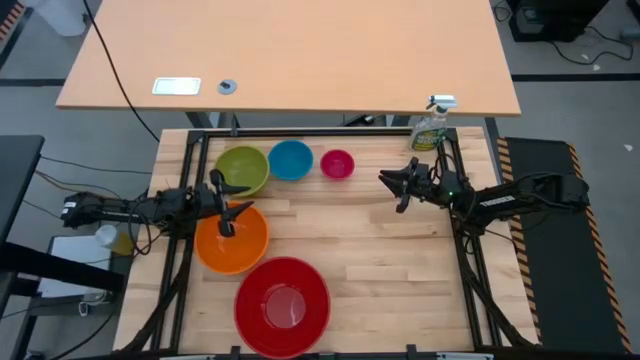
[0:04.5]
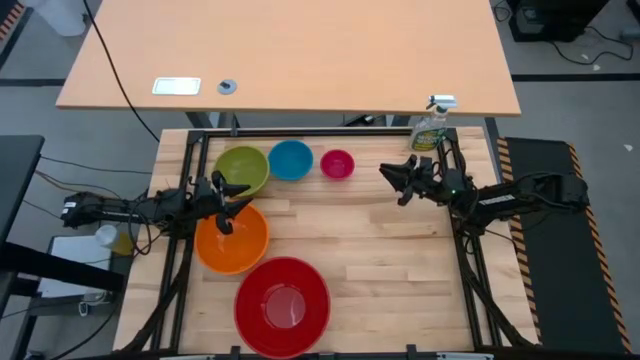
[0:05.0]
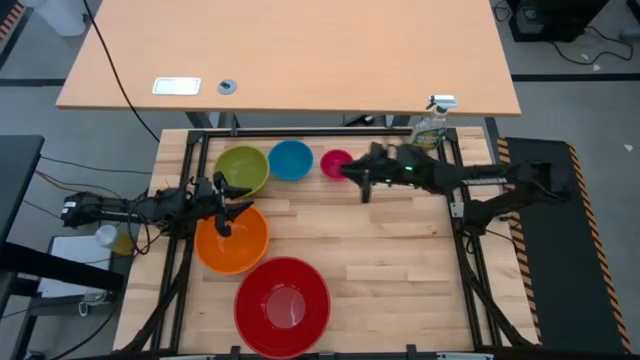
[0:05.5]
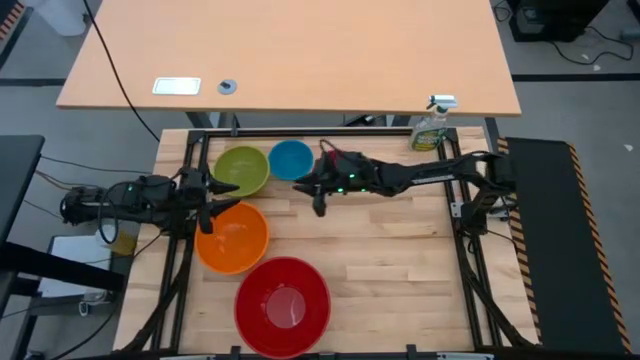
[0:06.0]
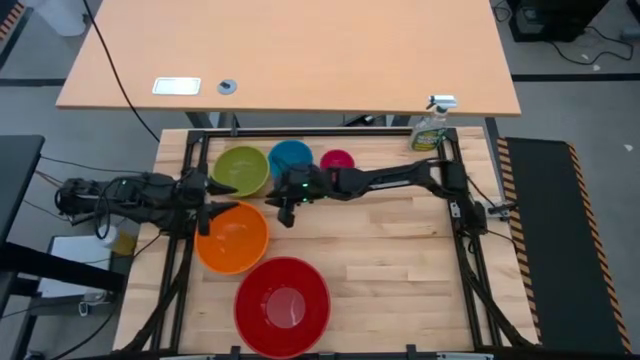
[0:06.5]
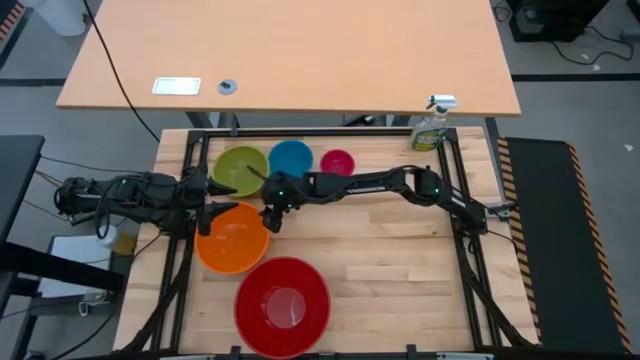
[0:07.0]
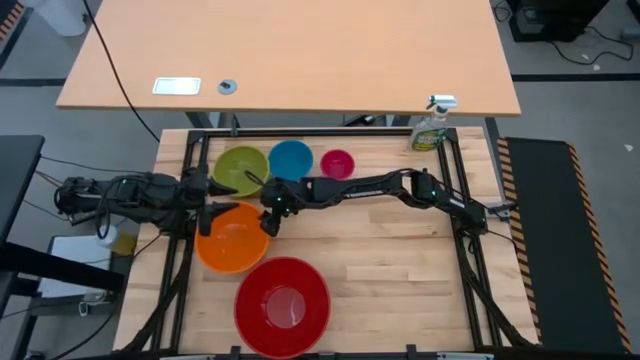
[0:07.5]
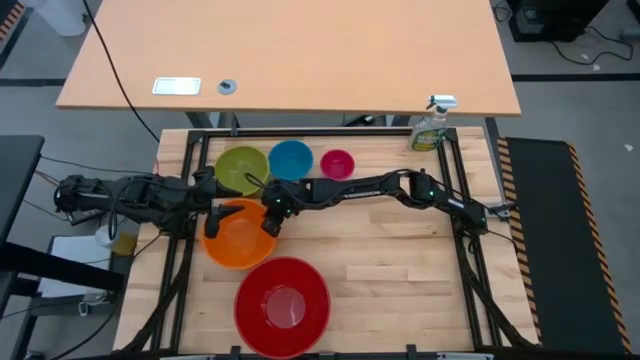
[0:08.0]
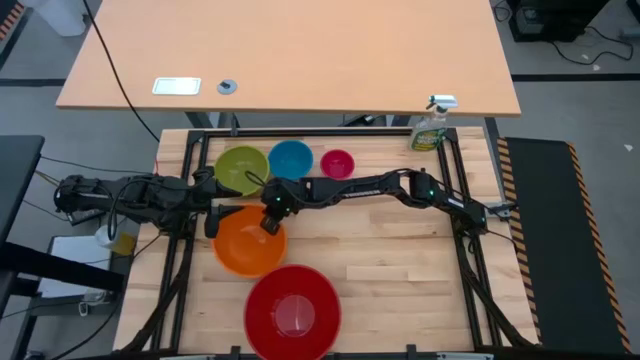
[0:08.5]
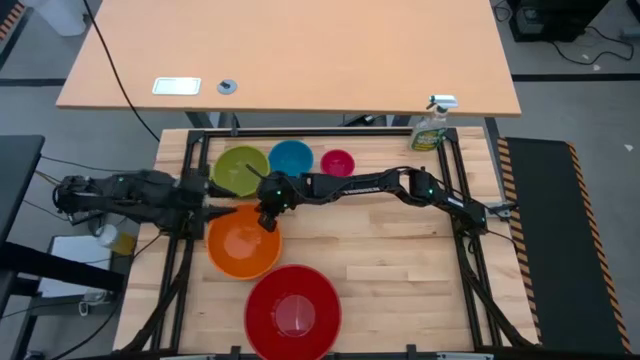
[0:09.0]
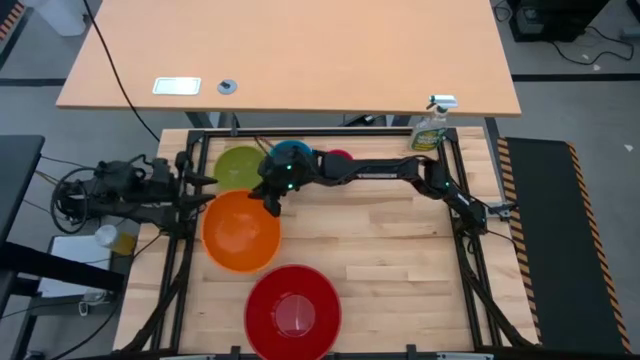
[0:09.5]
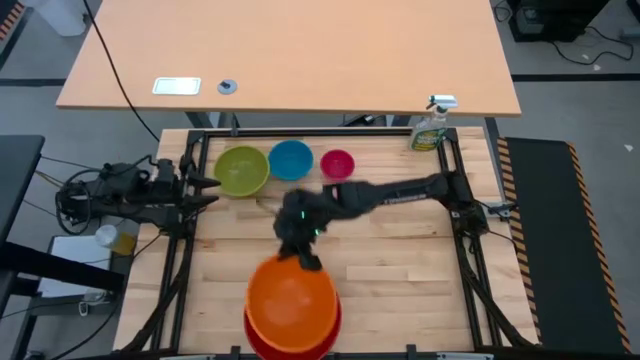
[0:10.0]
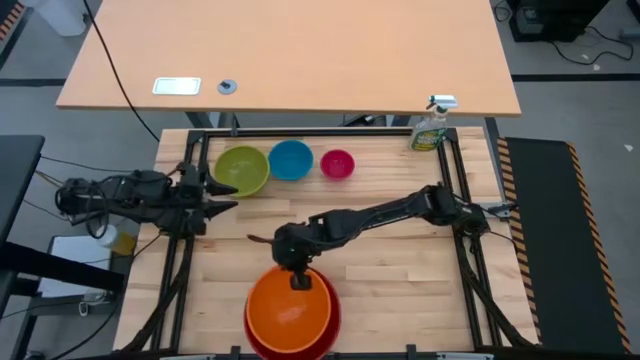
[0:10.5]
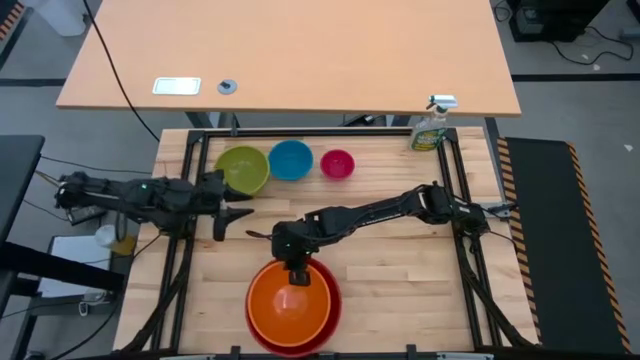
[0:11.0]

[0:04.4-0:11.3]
Stack the orange bowl on top of the red bowl

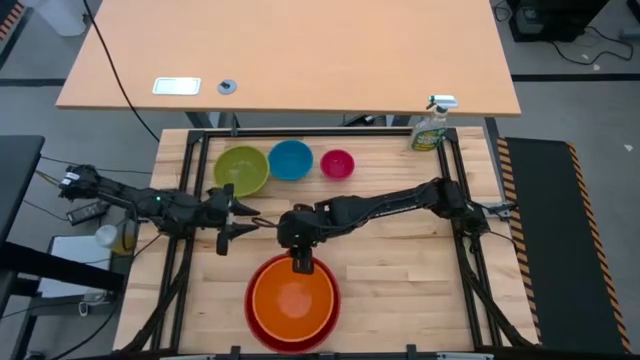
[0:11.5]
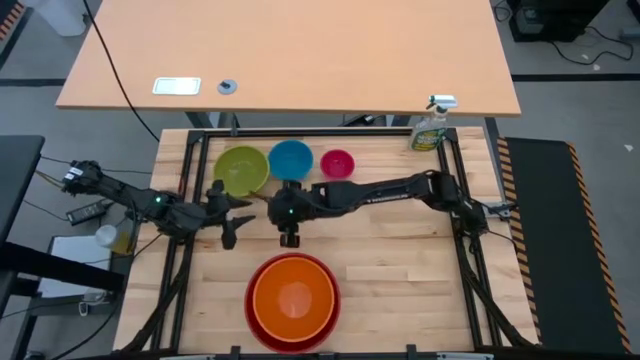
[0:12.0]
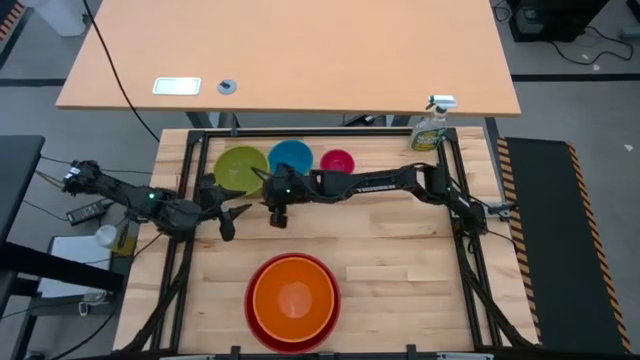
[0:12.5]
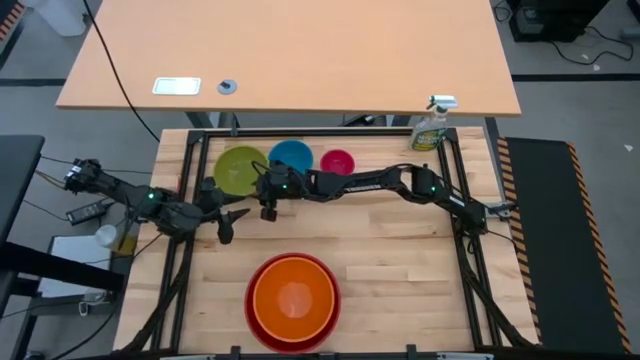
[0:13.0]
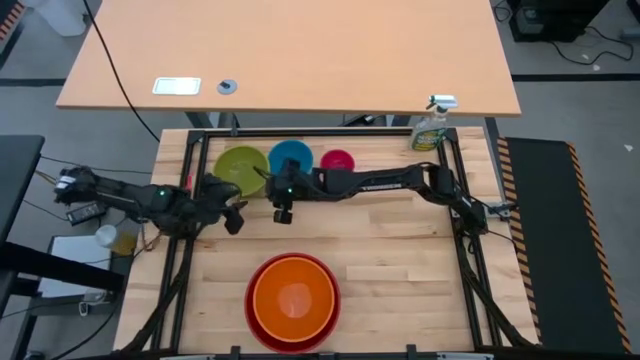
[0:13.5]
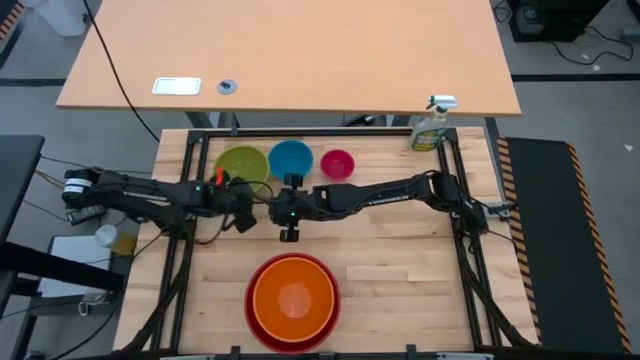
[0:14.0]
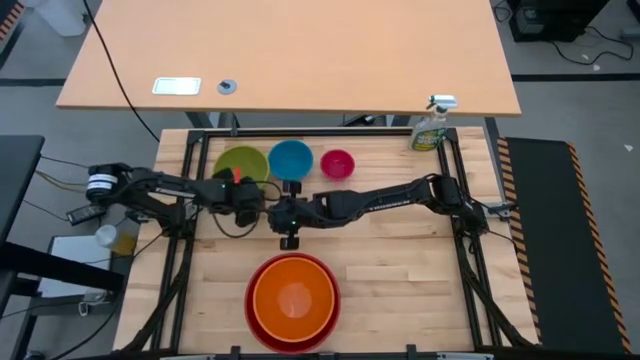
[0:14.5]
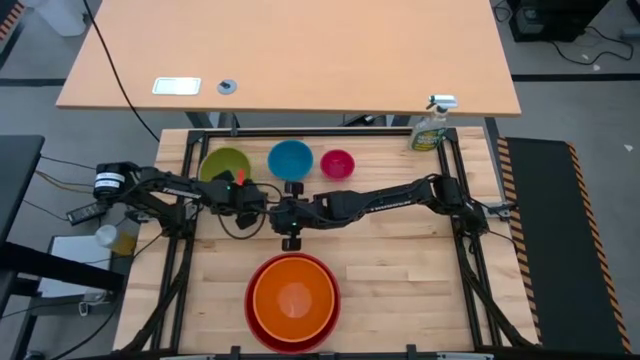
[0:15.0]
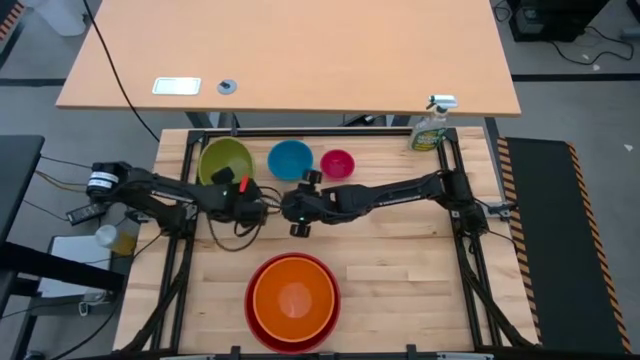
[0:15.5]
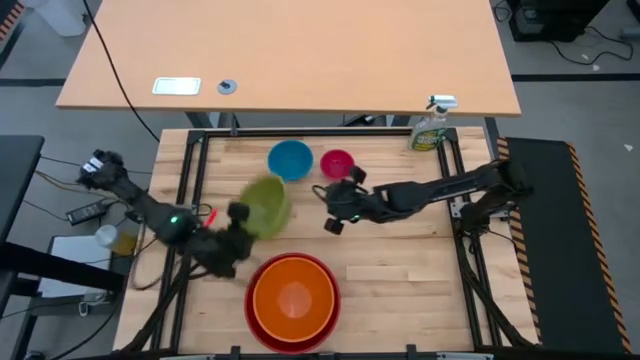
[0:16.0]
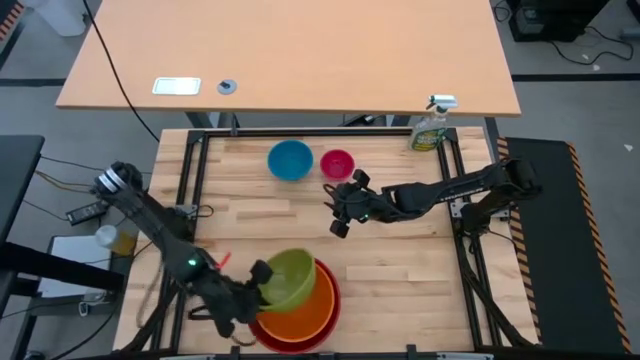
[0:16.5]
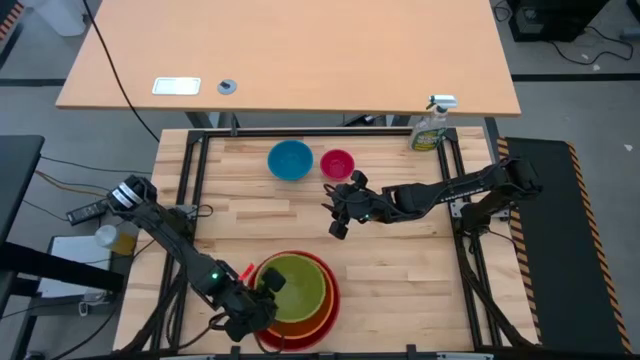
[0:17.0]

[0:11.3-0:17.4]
Stack the green on top of the orange bowl

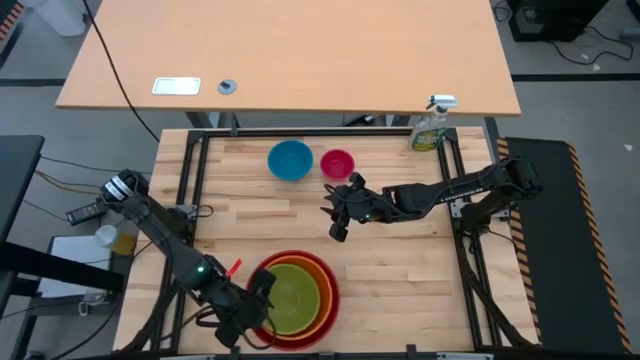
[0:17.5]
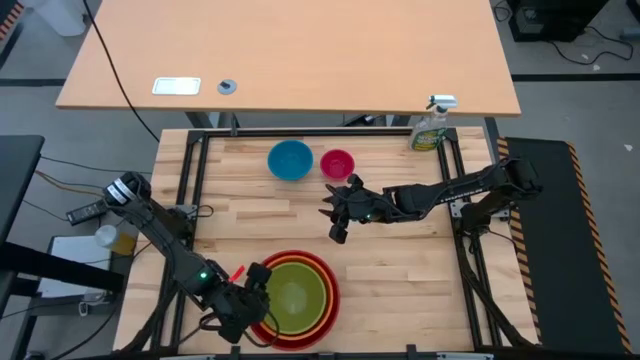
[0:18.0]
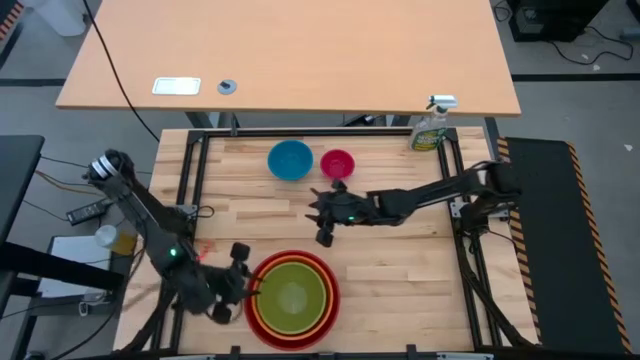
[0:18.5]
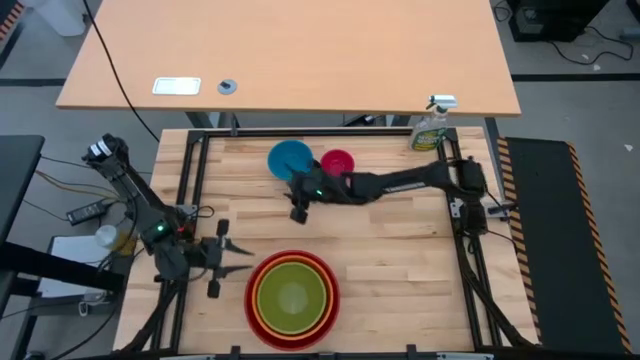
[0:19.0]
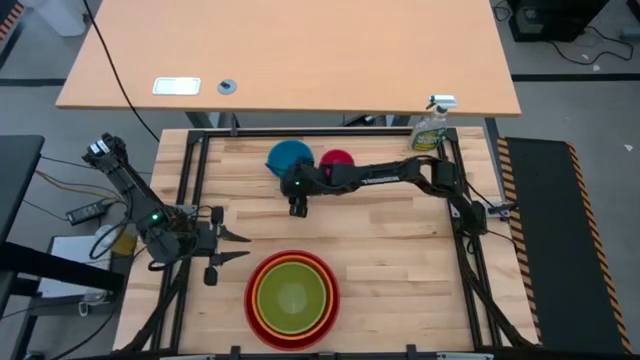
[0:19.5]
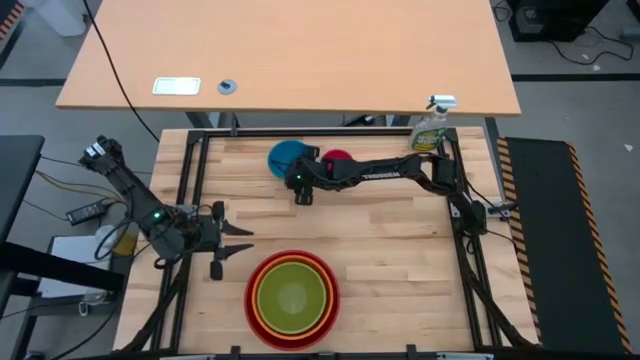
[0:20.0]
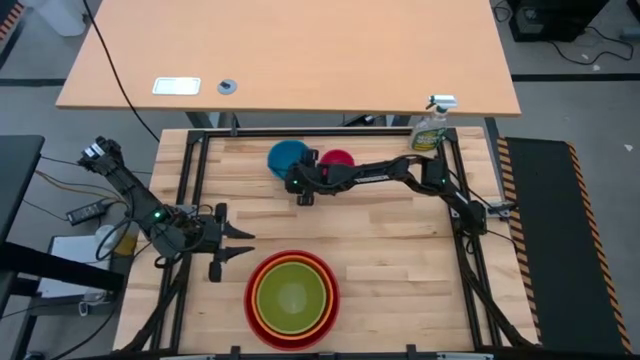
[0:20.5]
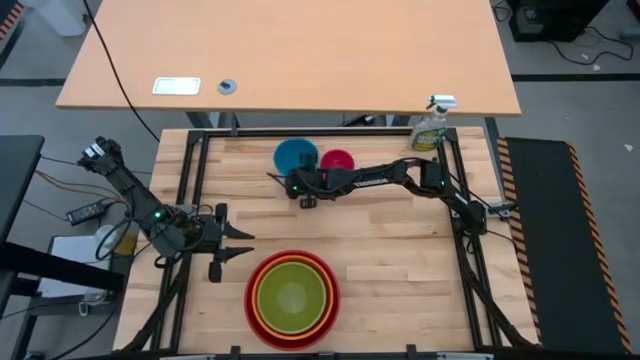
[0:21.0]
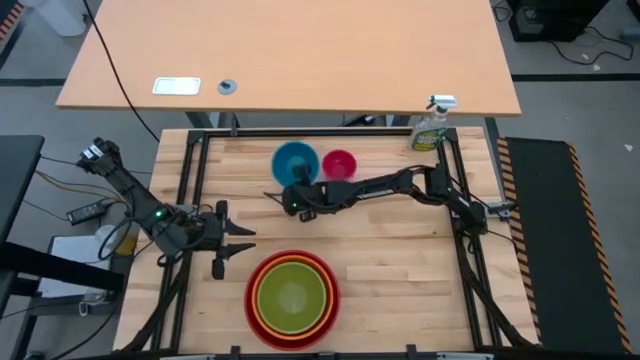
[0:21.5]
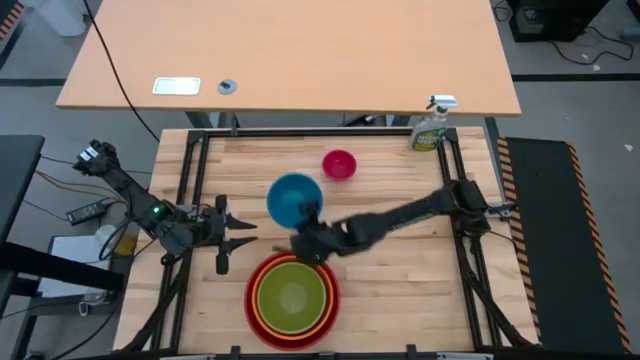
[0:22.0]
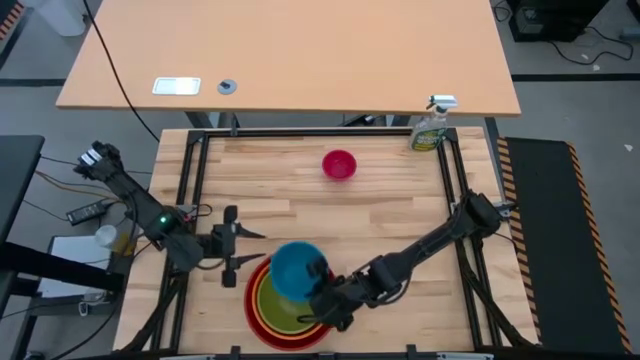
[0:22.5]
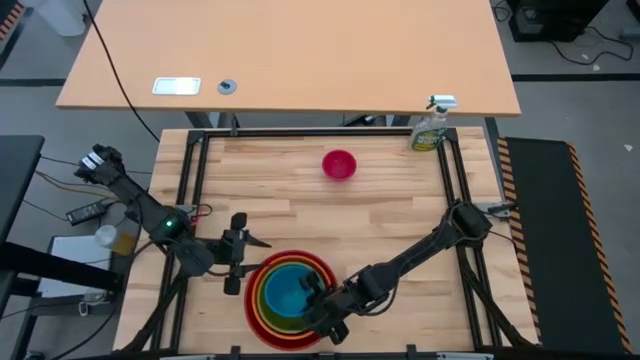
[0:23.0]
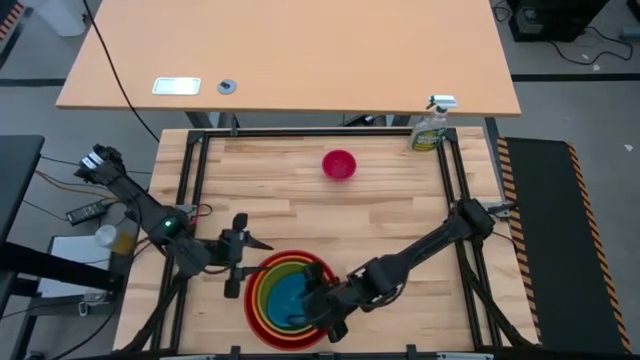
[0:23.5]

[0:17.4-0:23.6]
Stack the blue bowl on top of the green bowl

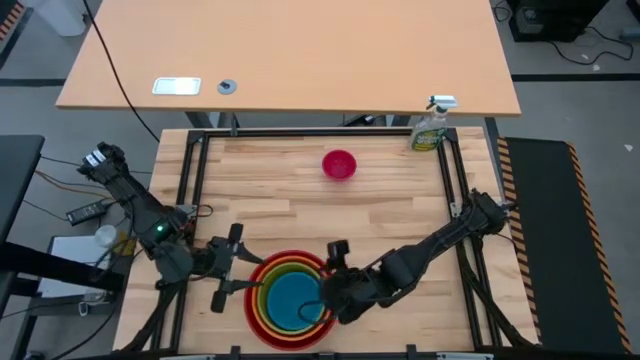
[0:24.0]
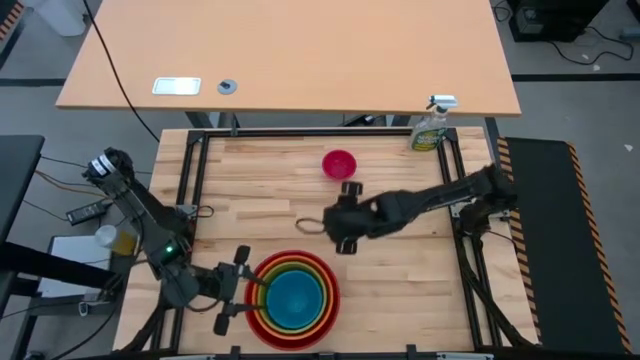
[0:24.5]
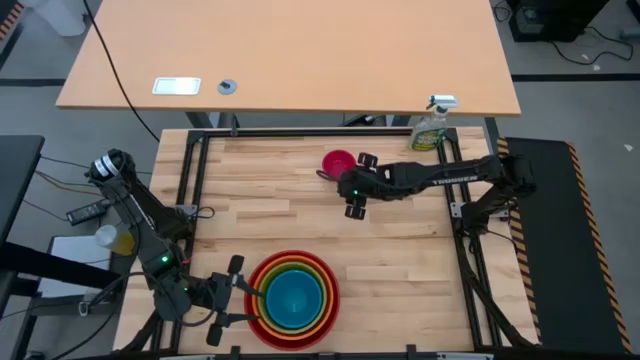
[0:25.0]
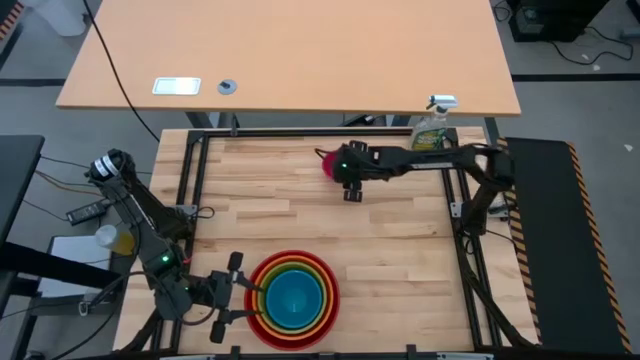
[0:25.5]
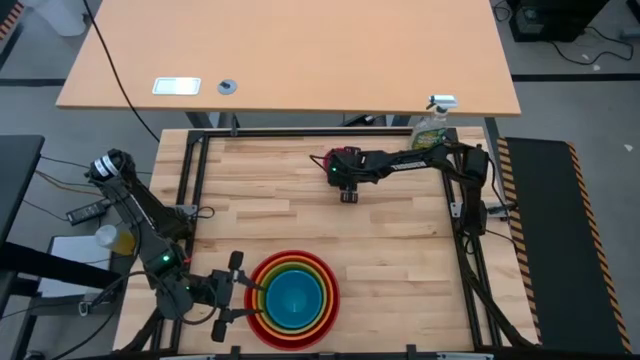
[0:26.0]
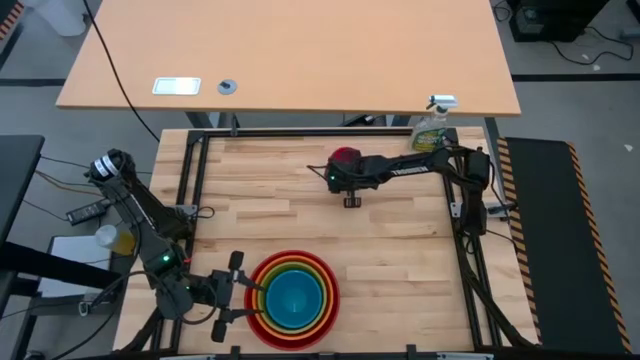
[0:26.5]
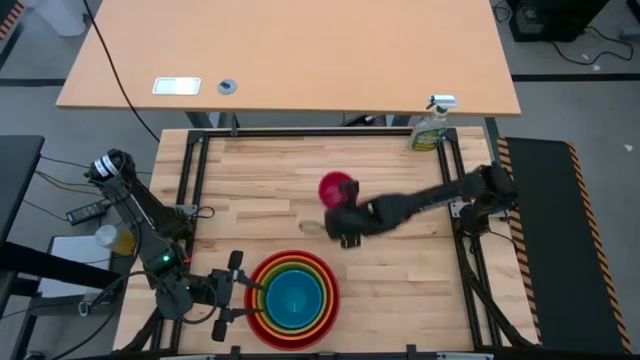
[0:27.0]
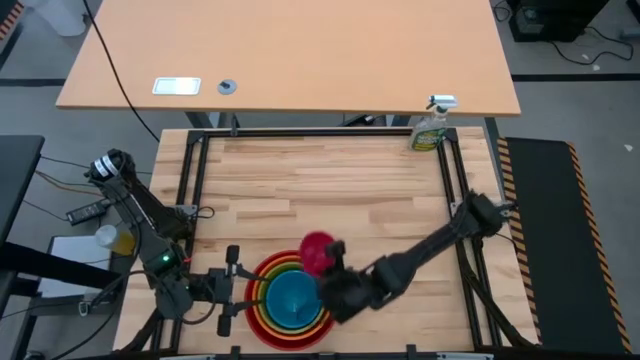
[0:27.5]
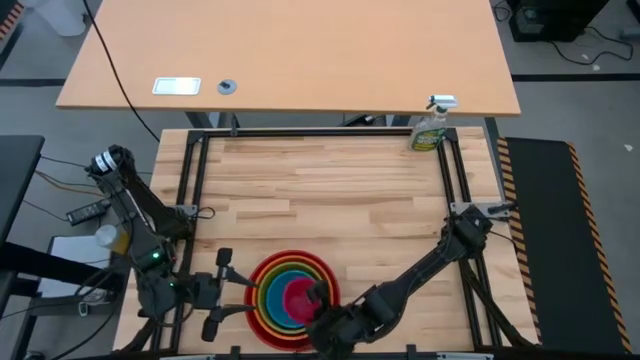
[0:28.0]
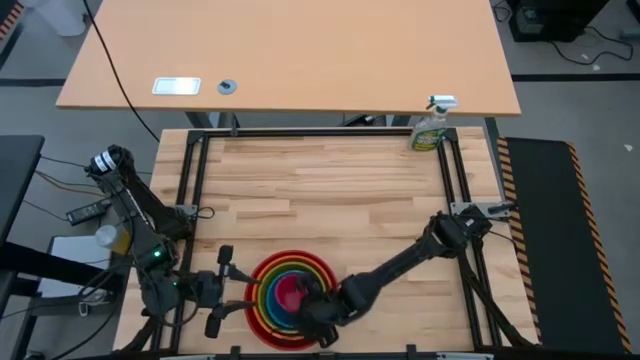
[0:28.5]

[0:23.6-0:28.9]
Stack the pink bowl on top of the blue bowl
